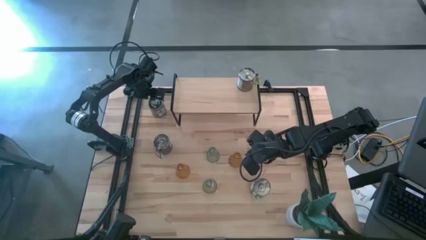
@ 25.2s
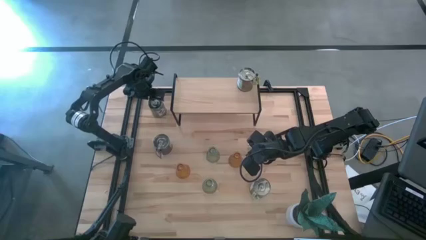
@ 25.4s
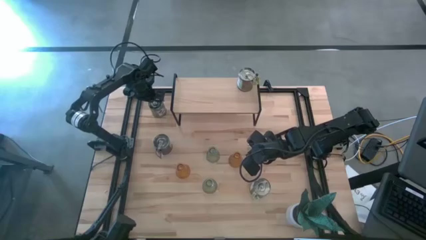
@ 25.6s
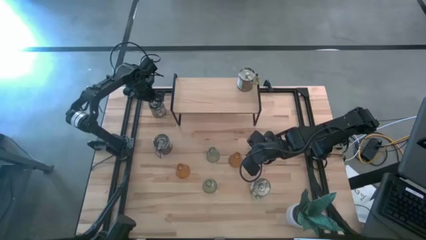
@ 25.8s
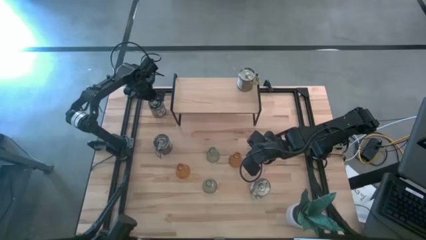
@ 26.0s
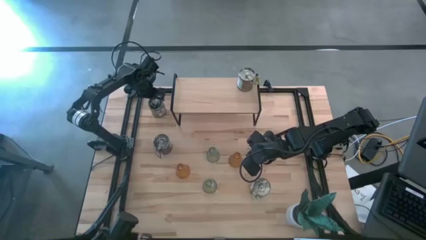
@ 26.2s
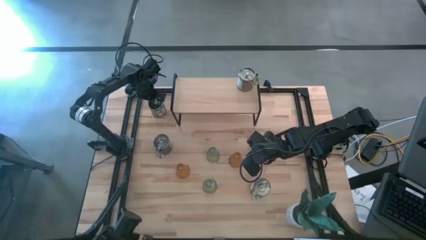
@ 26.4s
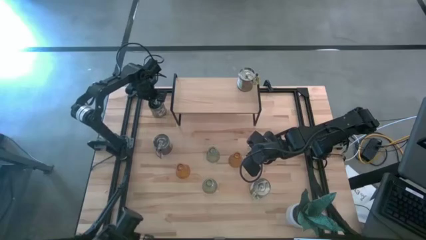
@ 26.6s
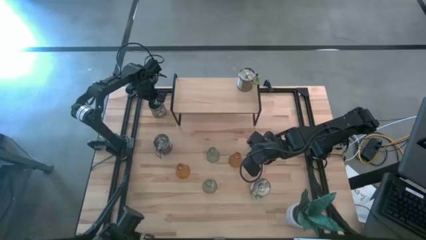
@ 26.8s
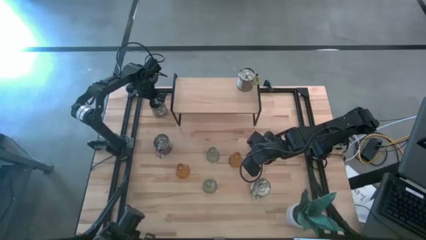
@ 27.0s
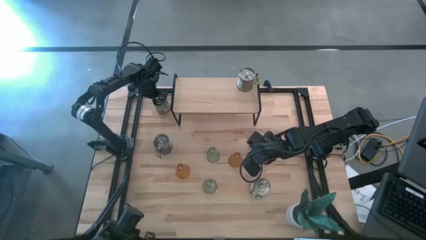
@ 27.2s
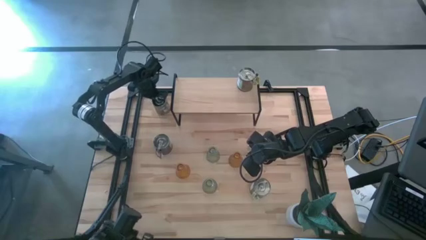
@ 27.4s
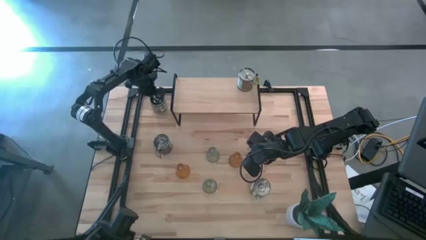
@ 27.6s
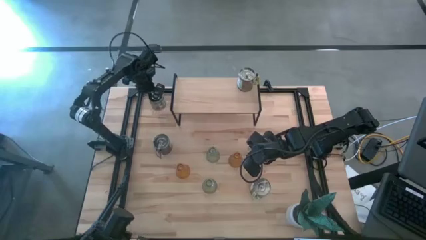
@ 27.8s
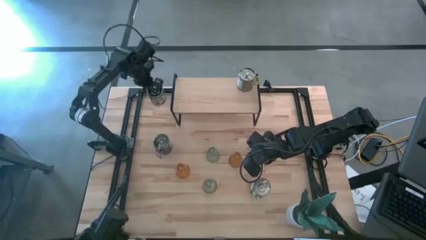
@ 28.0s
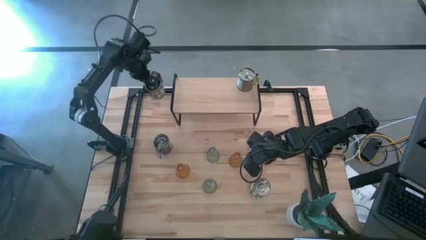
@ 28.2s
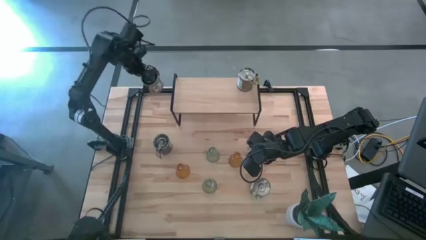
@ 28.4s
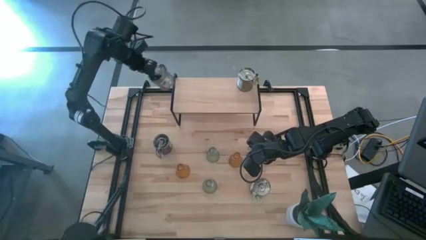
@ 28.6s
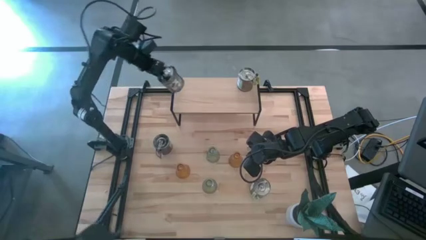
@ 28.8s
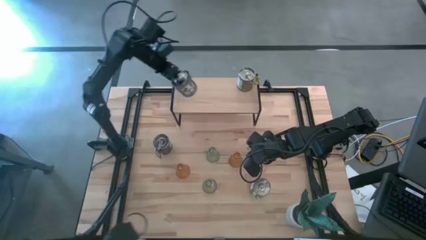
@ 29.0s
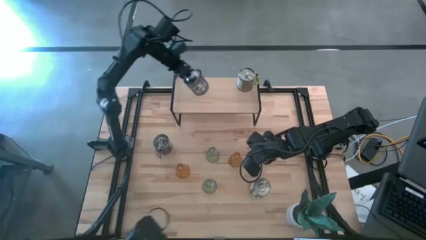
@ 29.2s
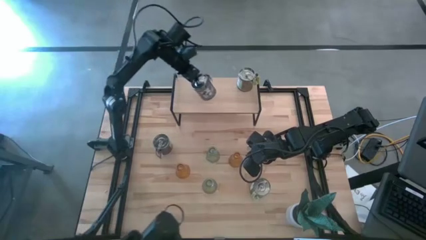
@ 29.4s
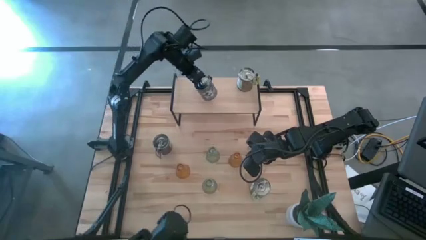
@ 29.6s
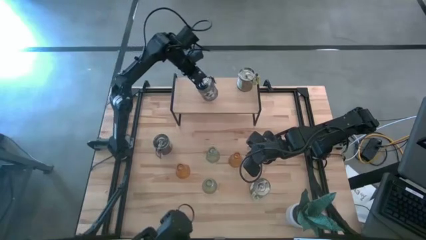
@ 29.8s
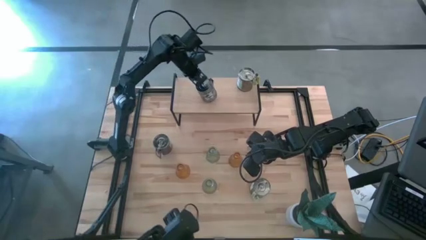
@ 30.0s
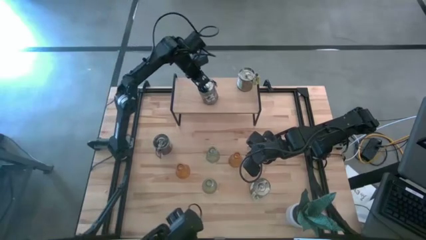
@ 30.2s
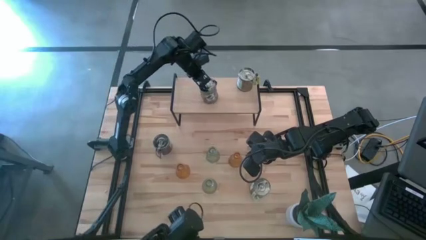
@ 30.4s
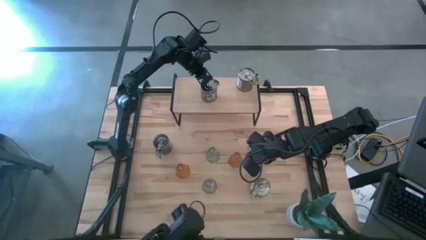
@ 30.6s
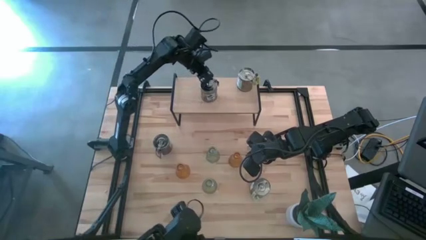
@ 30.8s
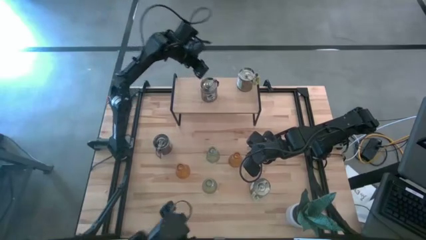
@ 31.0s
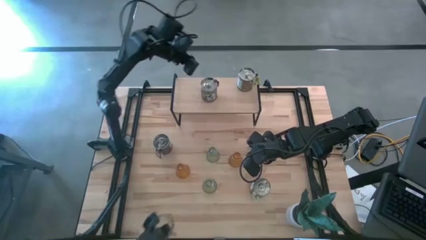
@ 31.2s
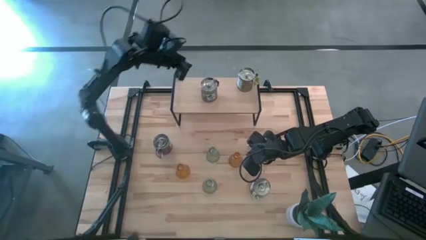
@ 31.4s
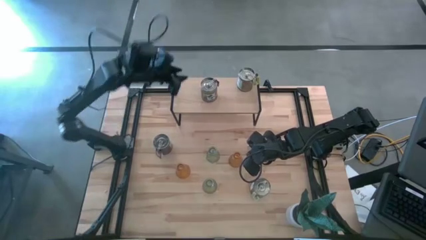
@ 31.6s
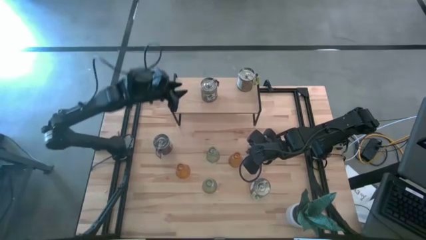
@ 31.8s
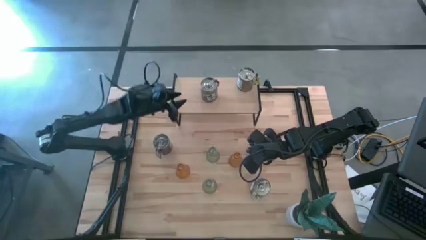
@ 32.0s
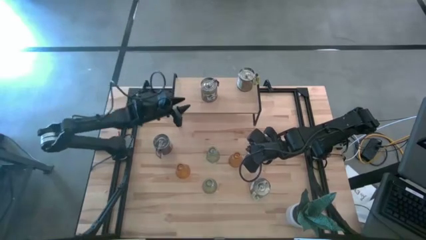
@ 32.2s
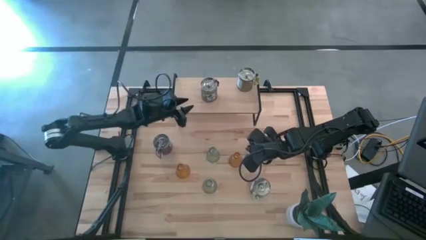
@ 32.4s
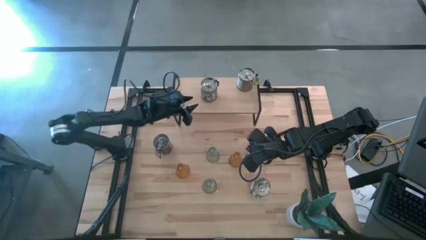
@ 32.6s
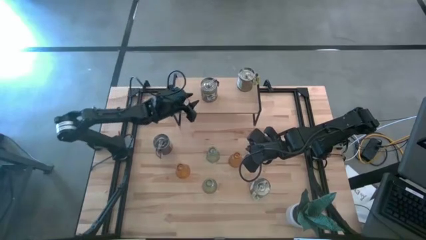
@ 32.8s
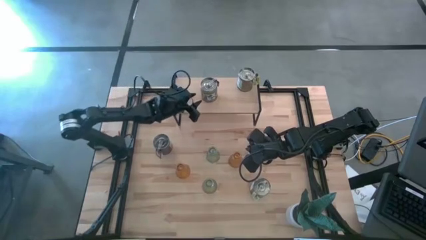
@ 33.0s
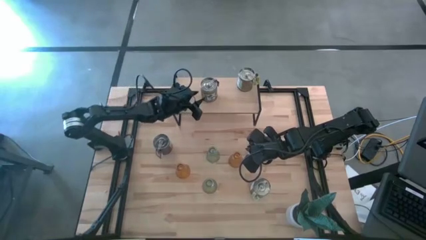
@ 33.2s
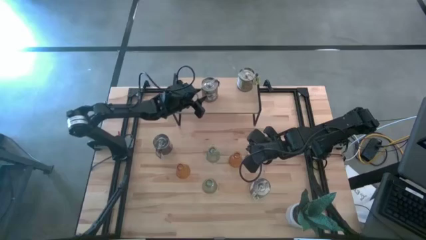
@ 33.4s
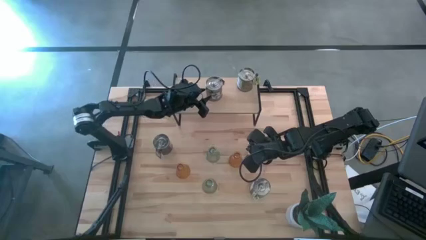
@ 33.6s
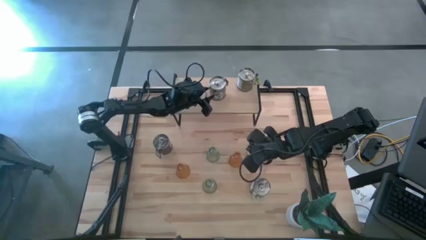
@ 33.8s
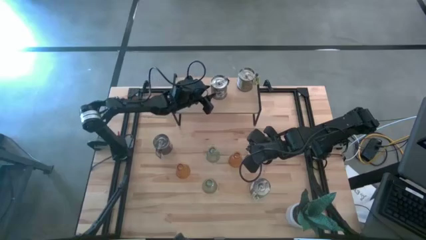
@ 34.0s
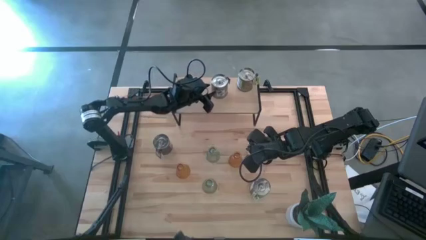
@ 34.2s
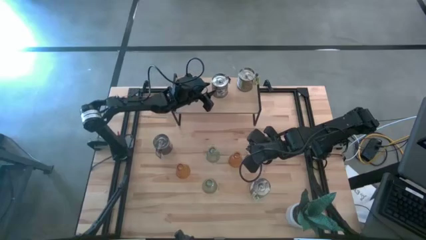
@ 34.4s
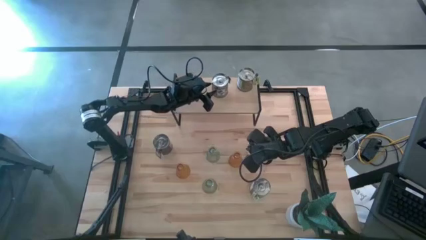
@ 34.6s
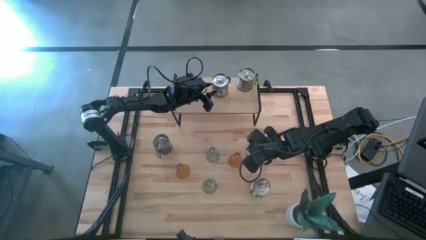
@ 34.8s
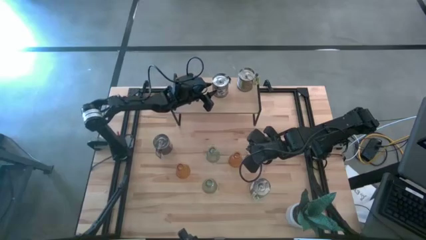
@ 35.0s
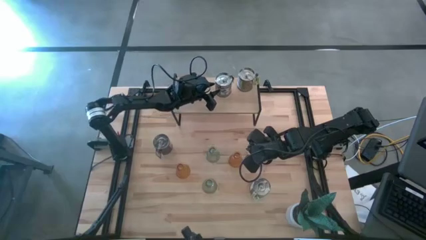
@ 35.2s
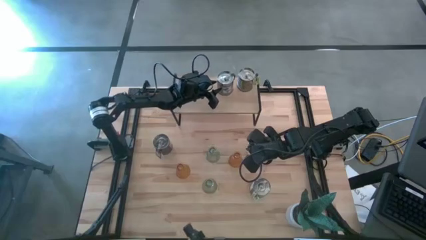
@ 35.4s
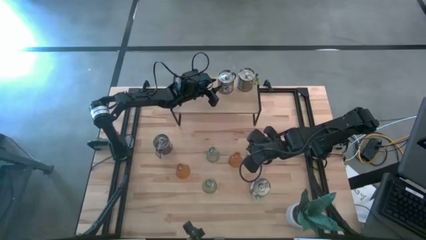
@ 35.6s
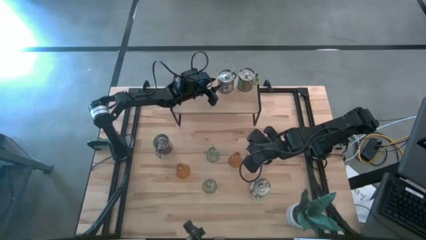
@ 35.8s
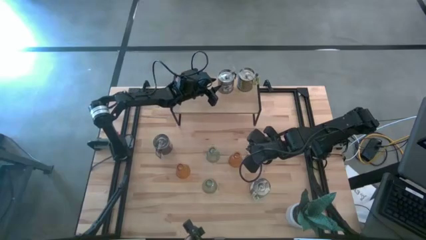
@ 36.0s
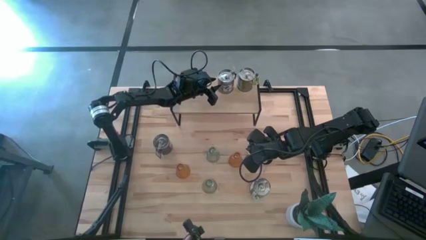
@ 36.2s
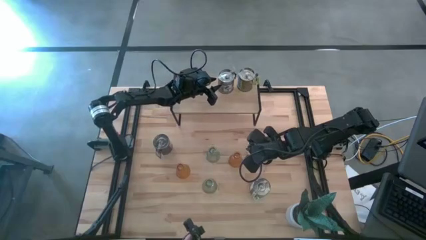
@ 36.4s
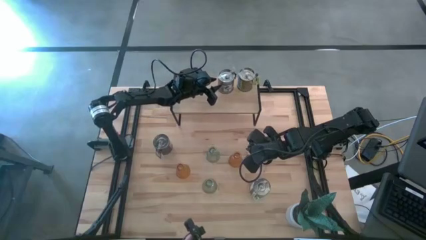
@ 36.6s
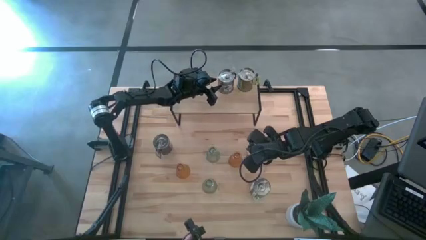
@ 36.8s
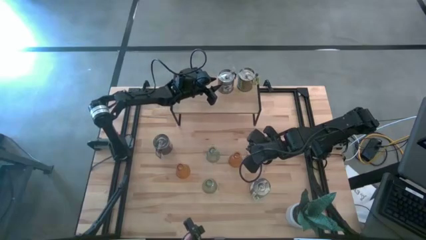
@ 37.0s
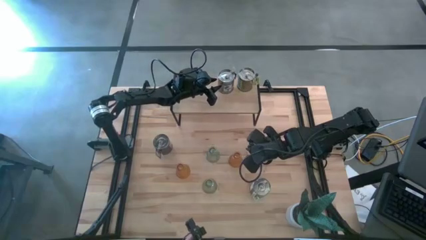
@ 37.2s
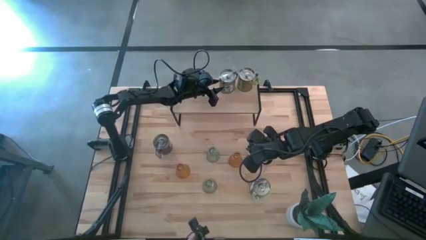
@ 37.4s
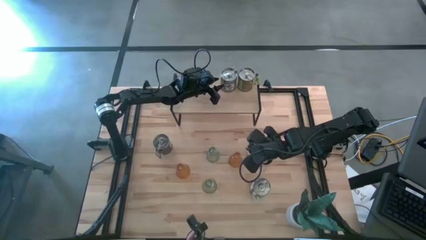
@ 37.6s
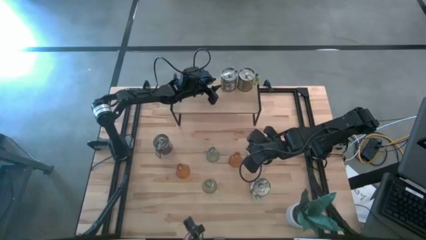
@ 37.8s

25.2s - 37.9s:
Task: Pick & Place candle stick holders
Put the silver scented candle on the shelf

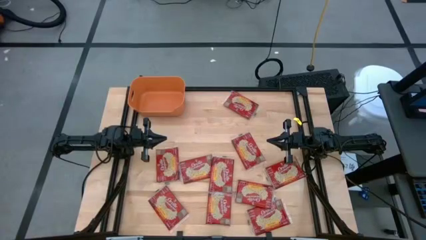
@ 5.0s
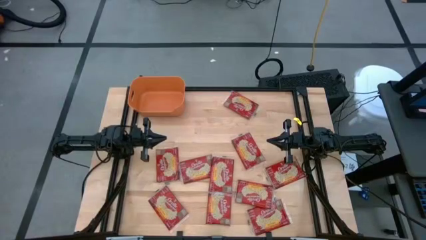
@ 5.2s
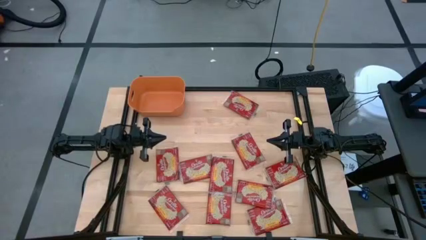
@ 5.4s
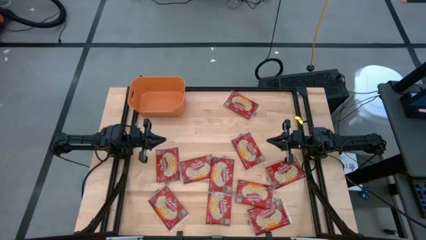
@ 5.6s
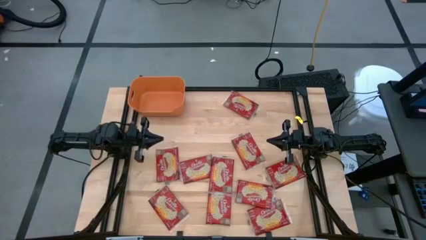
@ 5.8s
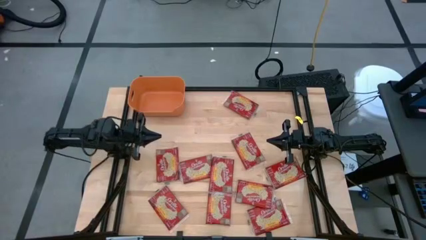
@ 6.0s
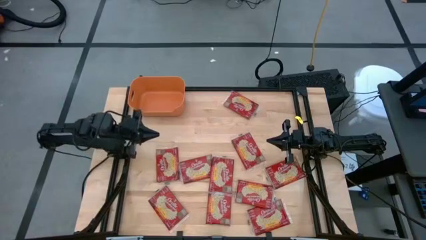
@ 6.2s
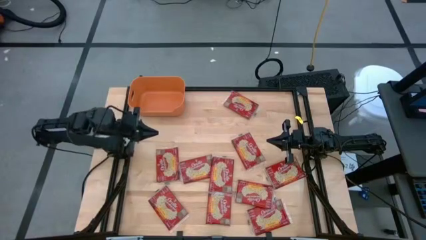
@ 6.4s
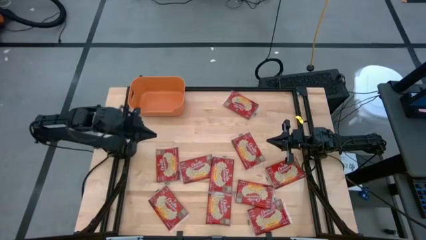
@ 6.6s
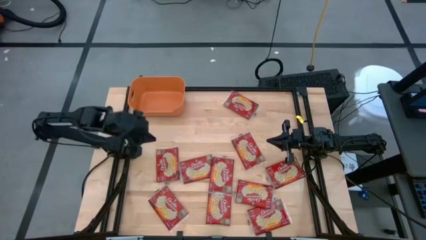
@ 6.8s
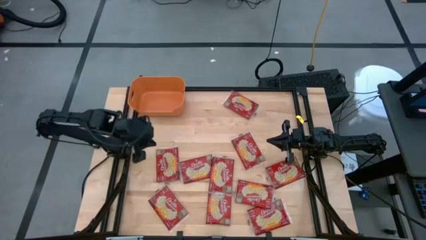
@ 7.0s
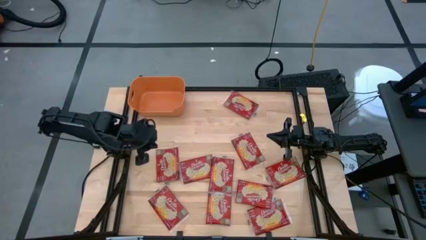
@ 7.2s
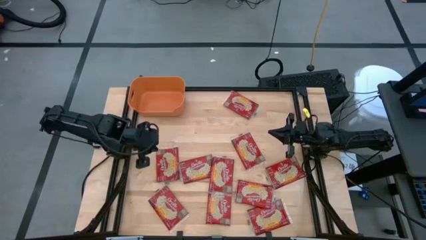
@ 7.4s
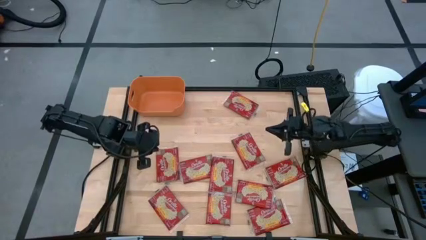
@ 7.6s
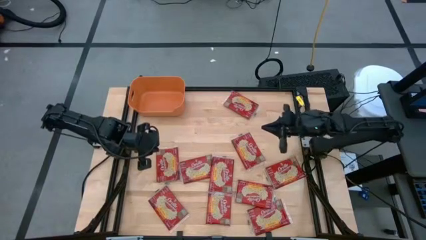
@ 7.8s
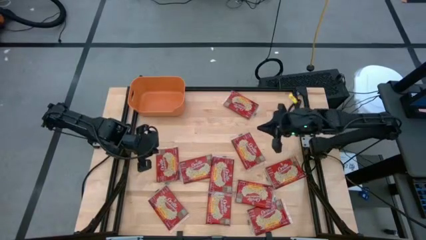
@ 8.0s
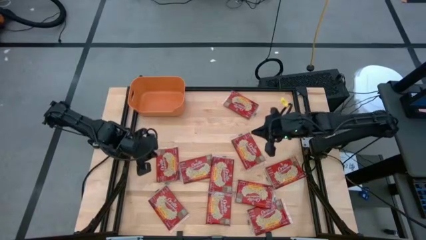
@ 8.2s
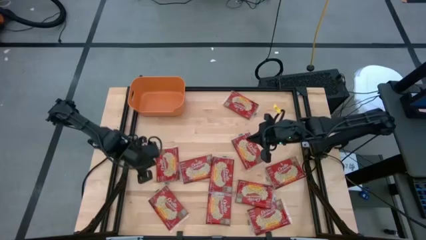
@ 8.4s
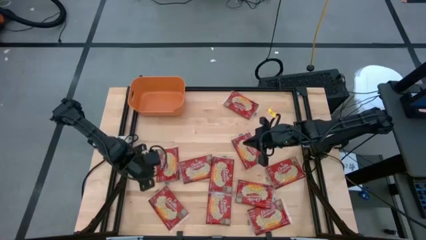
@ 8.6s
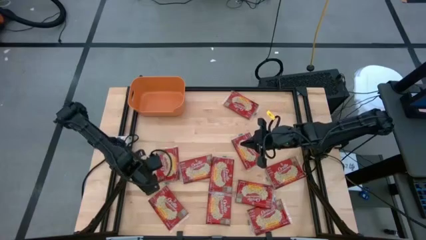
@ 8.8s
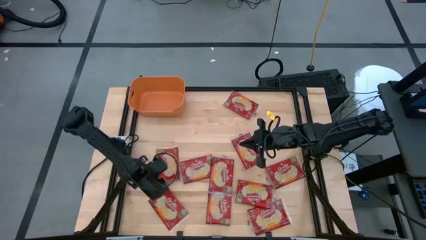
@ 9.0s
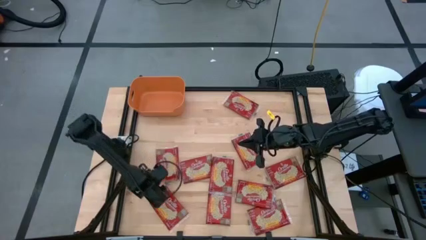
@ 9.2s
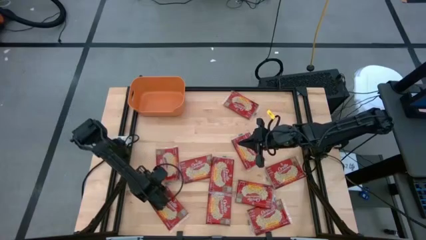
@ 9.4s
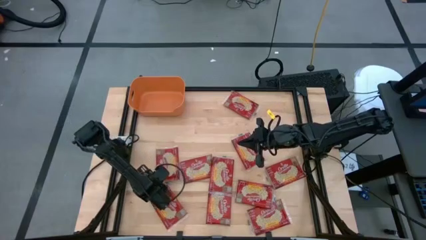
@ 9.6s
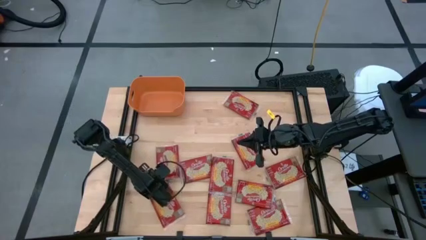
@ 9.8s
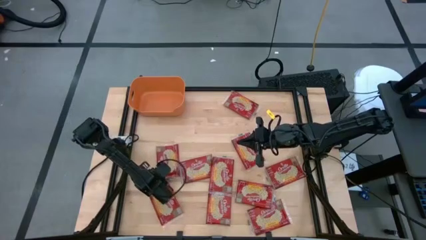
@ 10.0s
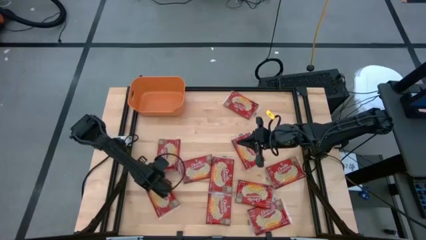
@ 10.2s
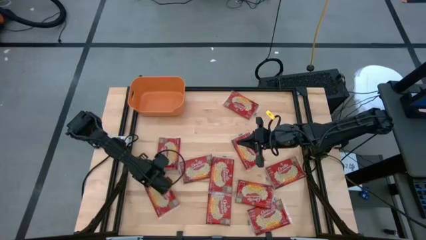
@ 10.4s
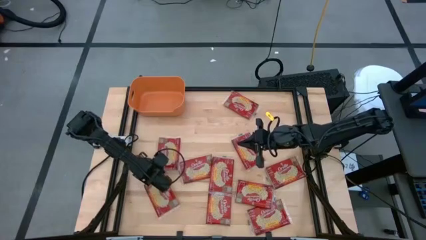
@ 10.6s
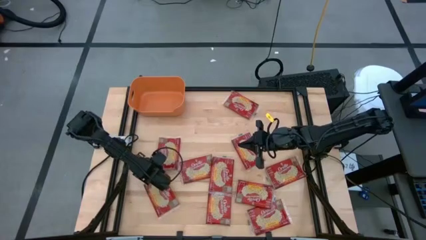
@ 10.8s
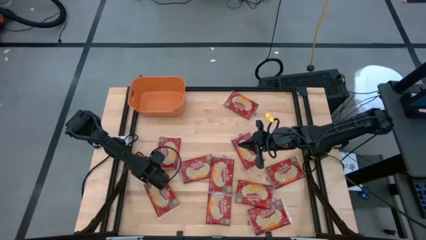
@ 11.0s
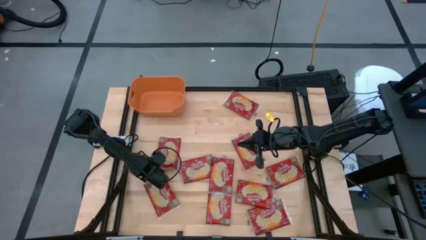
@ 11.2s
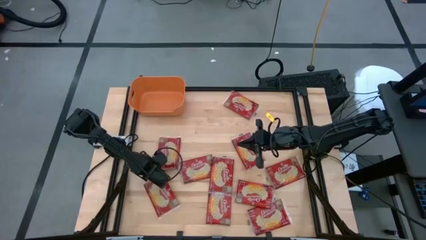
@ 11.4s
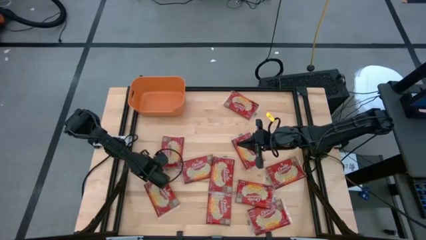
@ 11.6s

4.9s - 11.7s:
Task: Sort popcorn bags into baskets
Put the red popcorn bag into the orange container
